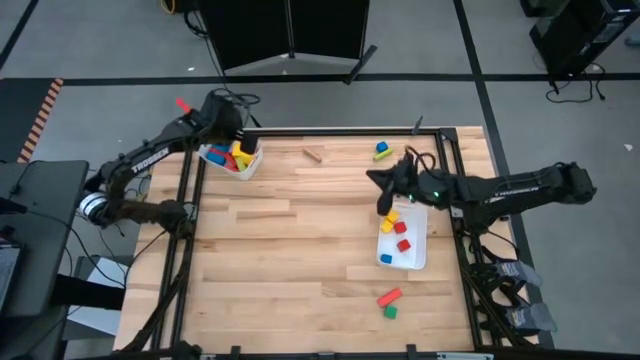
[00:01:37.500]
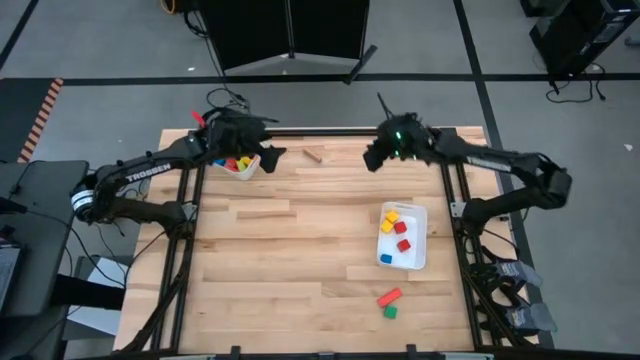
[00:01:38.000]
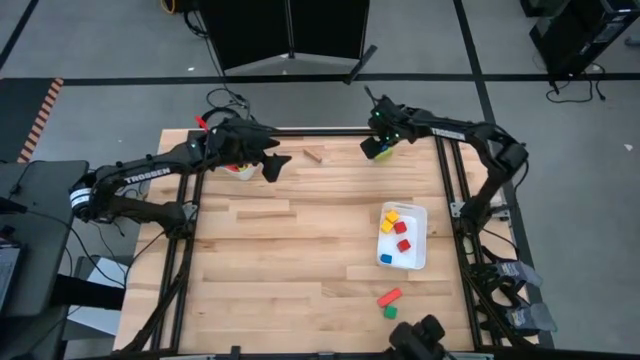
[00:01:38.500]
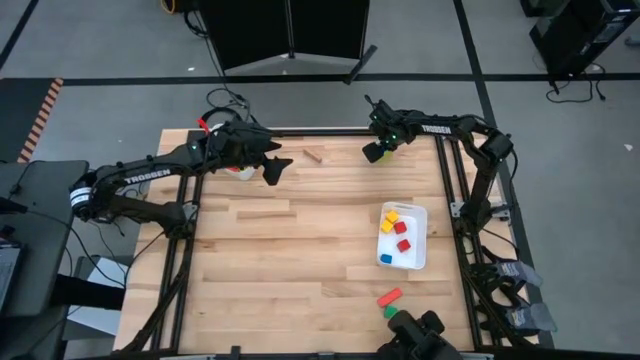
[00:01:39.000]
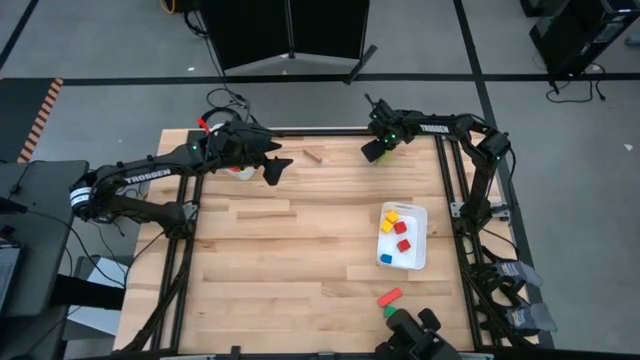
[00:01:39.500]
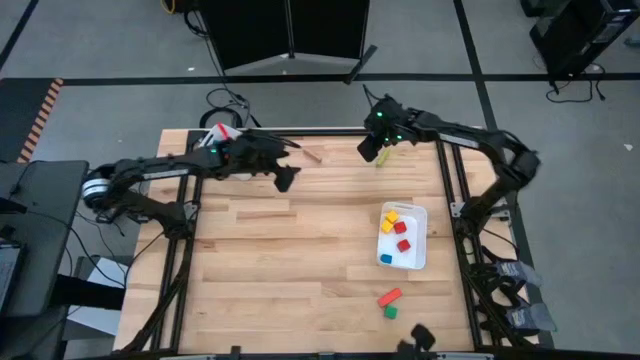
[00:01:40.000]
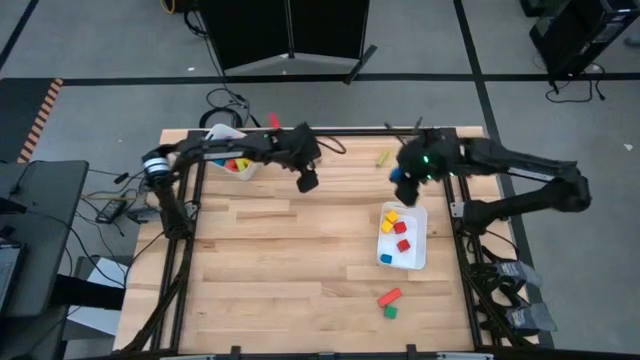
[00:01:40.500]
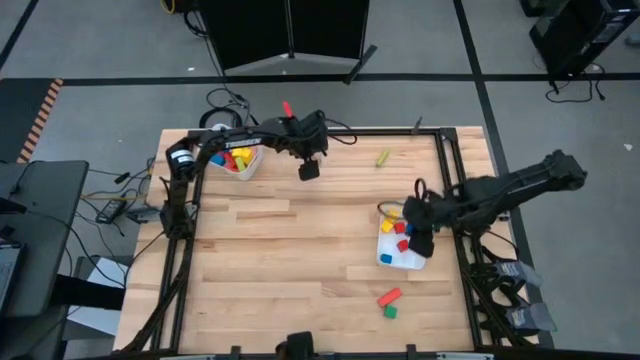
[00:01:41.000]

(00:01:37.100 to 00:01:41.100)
Task: Sort blocks by size
Put the blue cube block into the bottom white bin

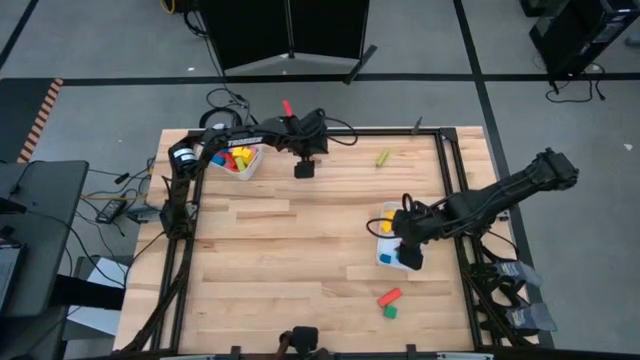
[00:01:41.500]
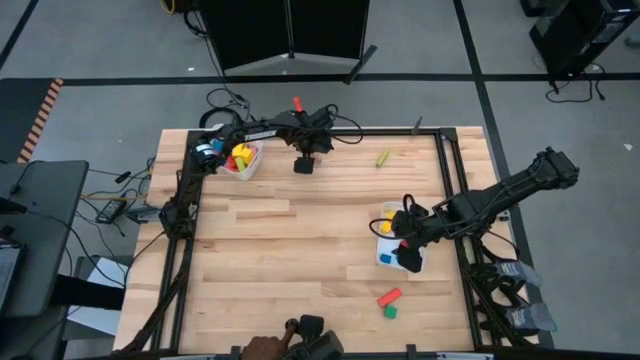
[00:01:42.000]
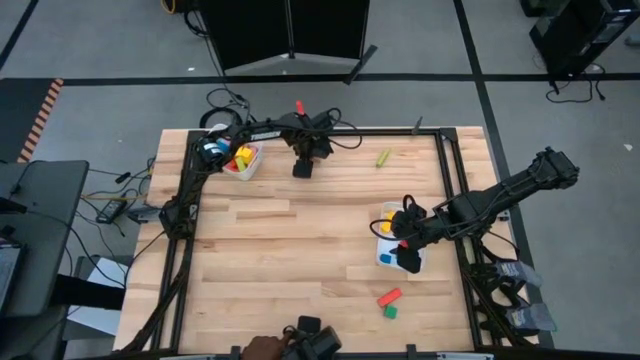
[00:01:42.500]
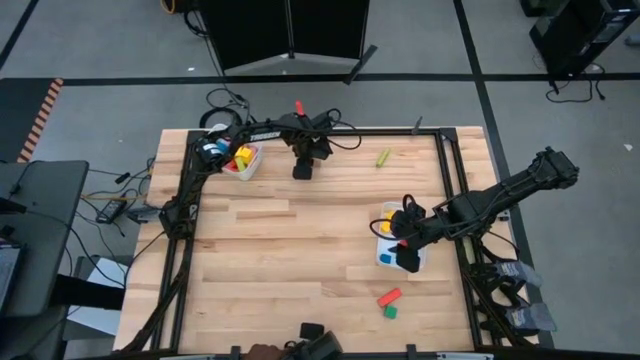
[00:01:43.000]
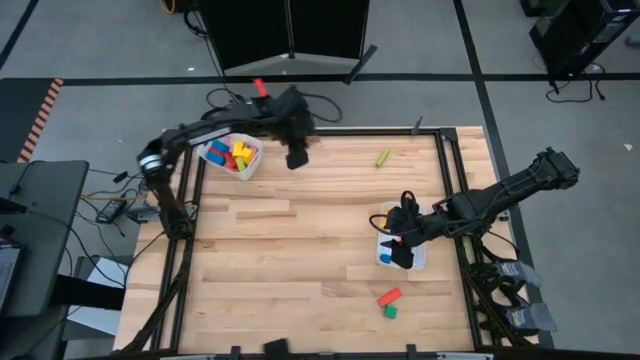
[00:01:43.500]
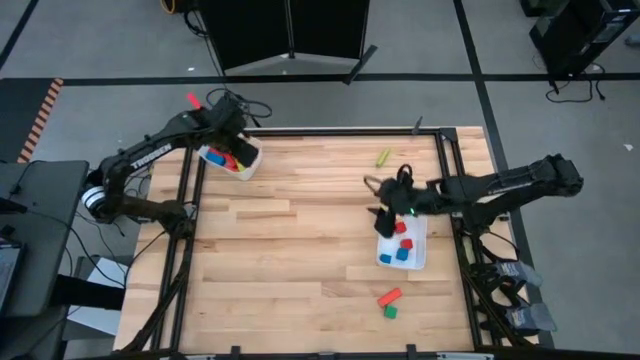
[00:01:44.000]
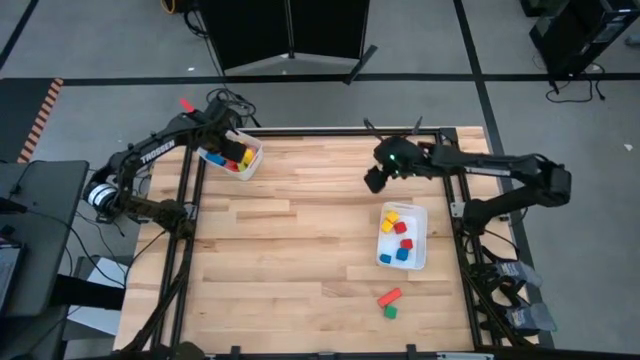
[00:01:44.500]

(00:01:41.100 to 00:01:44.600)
Put the brown rectangular block into the top white bin

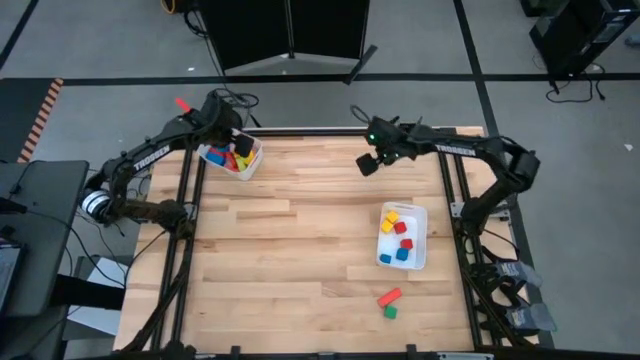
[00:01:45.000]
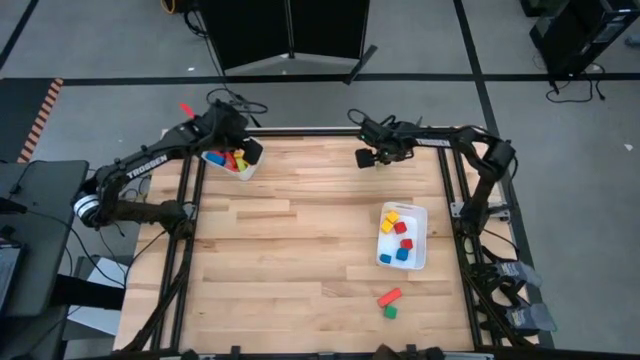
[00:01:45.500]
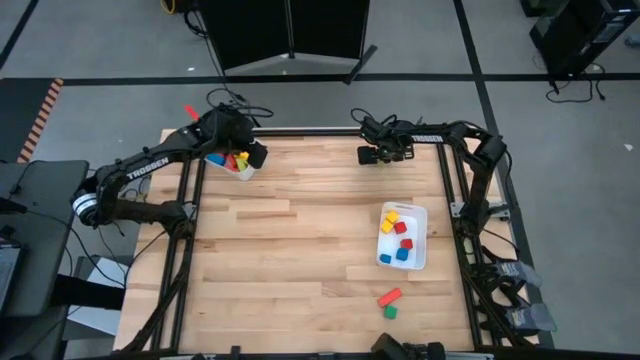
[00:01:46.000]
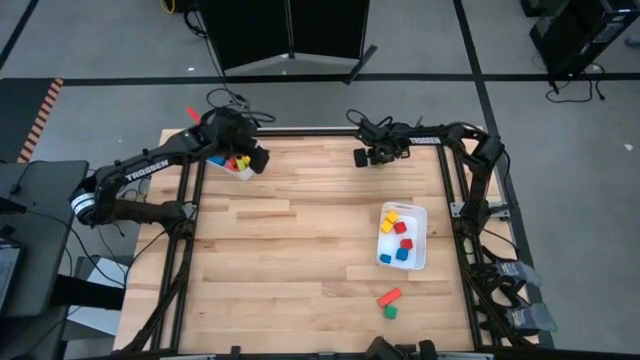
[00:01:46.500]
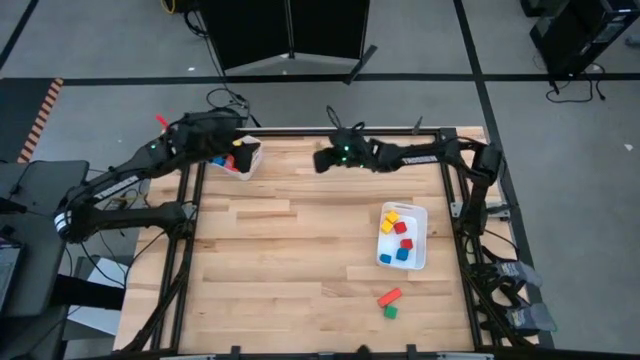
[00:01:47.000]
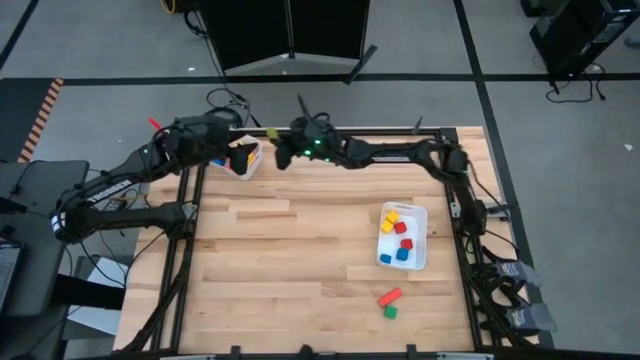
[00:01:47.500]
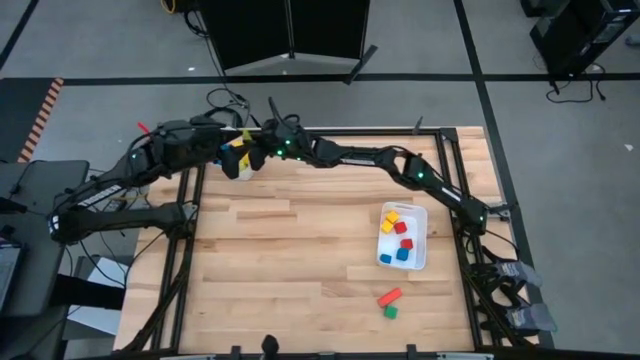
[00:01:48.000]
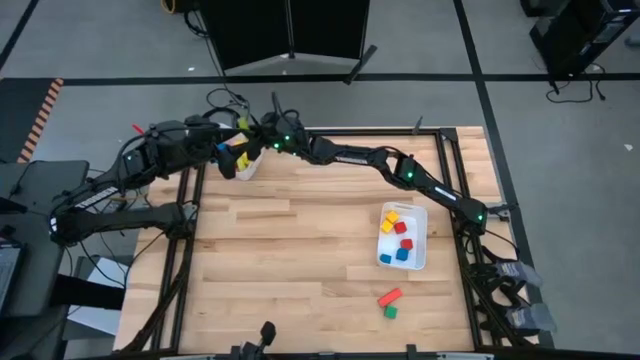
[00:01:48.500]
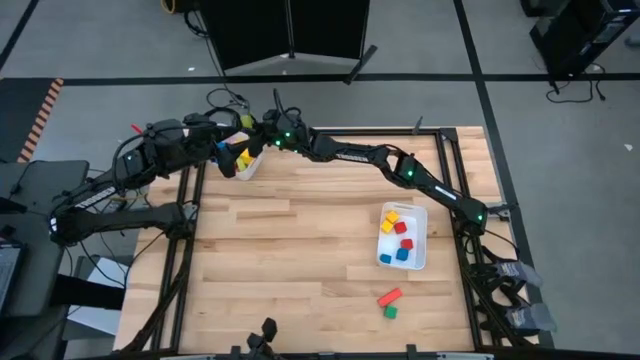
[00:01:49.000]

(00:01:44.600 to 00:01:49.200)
Put the light green rectangular block into the top white bin

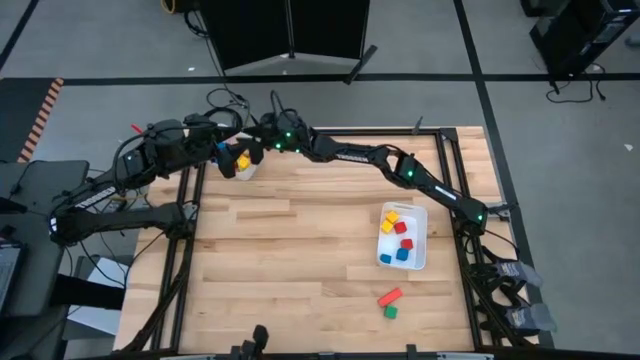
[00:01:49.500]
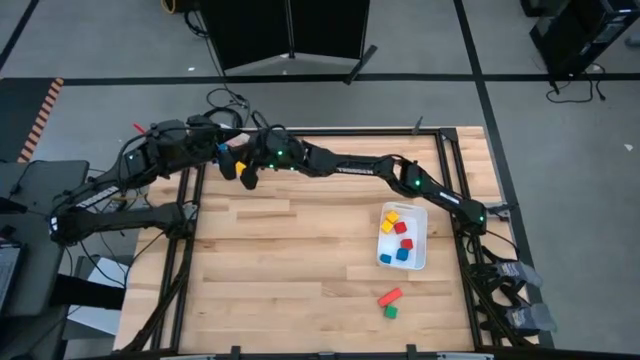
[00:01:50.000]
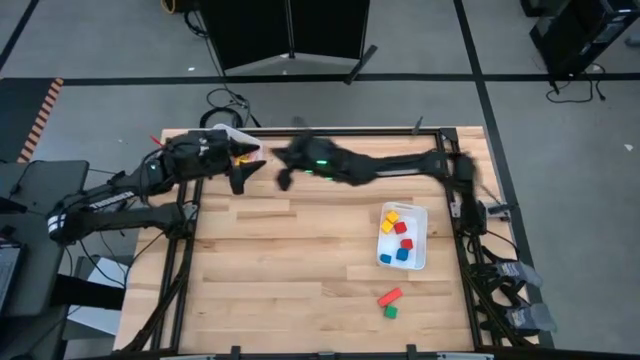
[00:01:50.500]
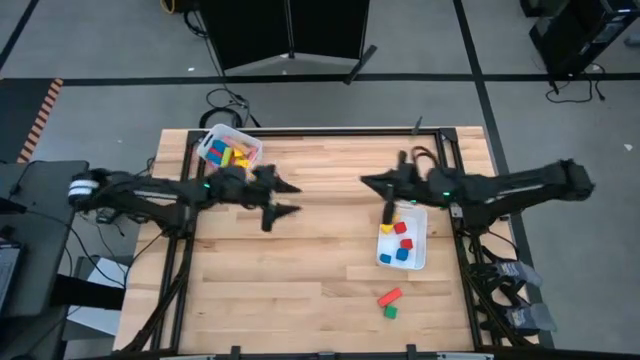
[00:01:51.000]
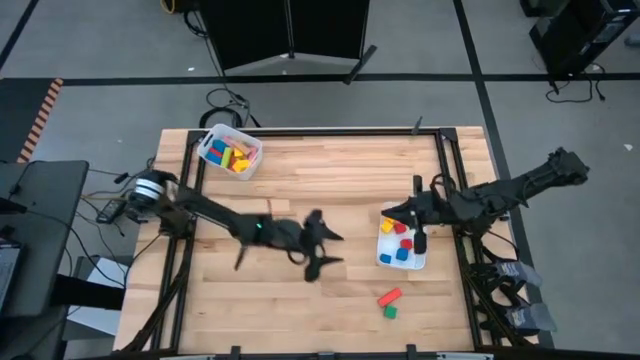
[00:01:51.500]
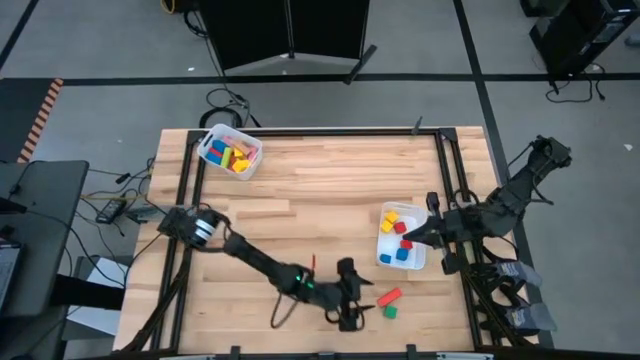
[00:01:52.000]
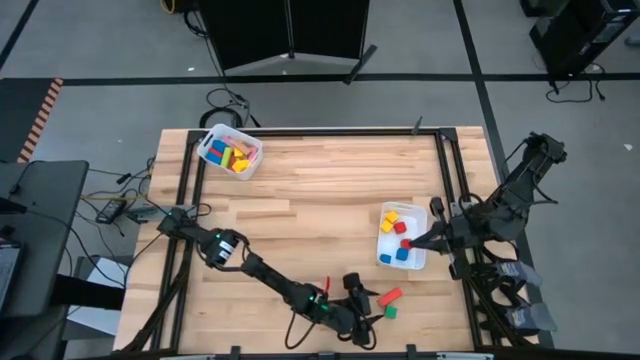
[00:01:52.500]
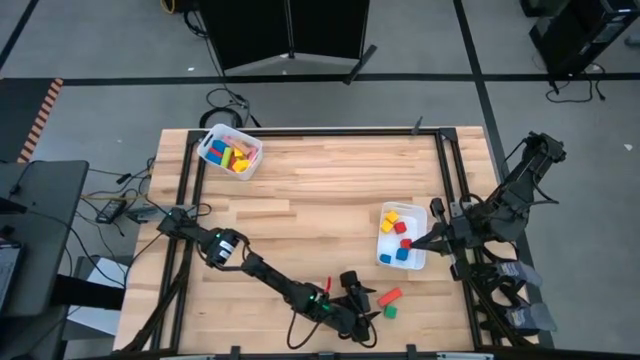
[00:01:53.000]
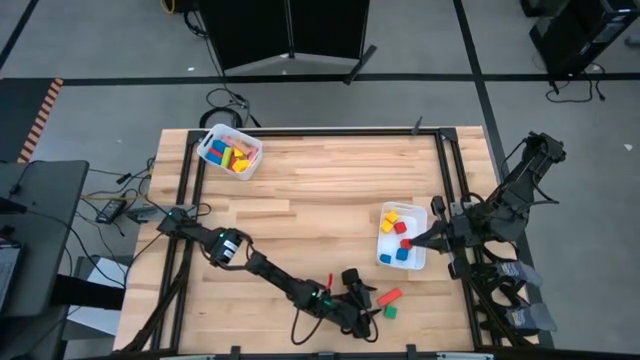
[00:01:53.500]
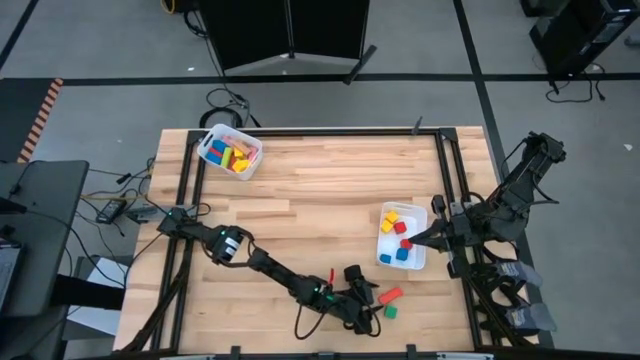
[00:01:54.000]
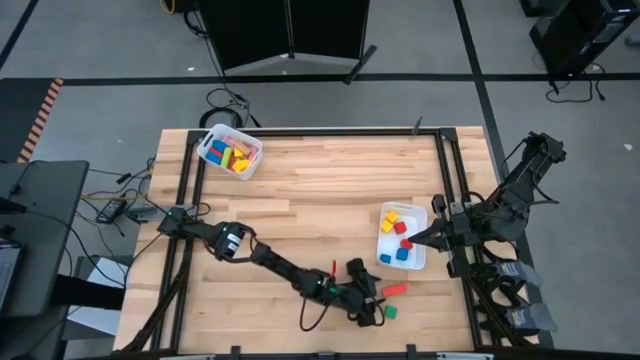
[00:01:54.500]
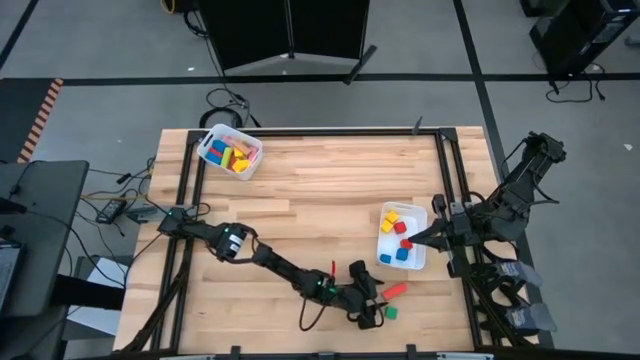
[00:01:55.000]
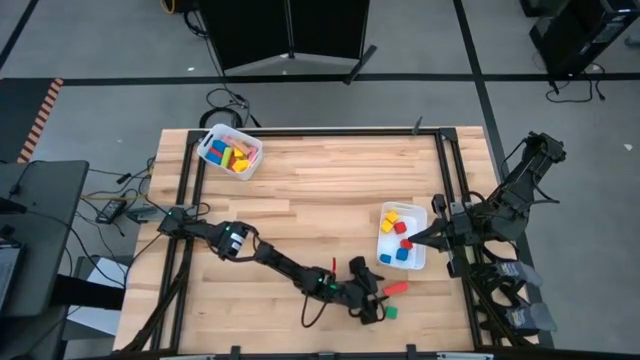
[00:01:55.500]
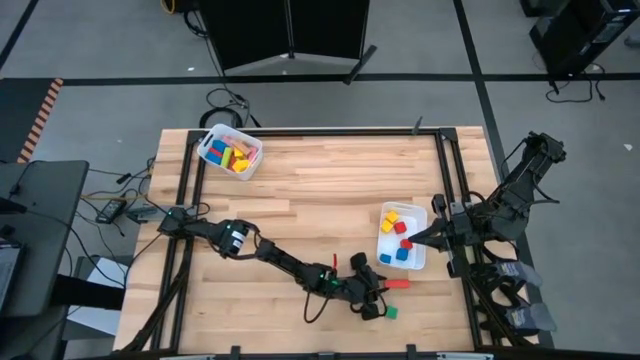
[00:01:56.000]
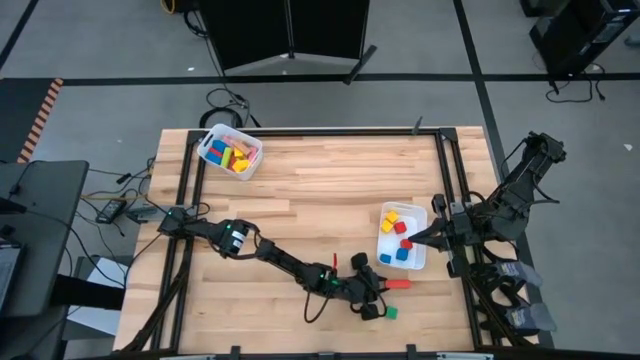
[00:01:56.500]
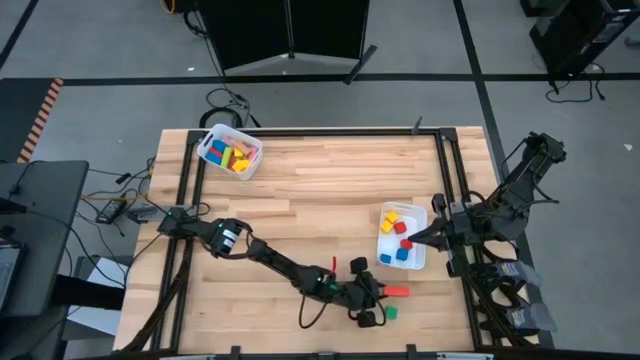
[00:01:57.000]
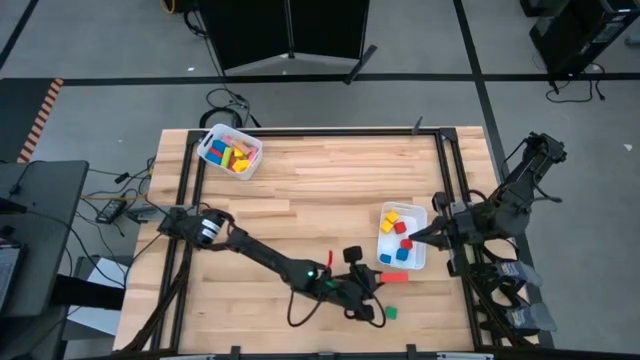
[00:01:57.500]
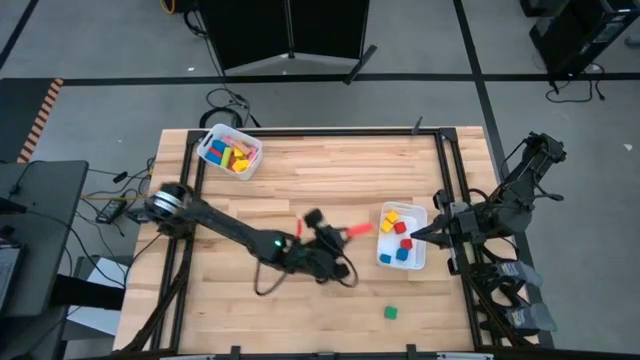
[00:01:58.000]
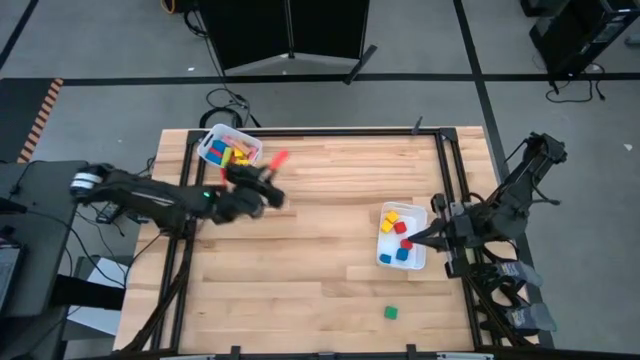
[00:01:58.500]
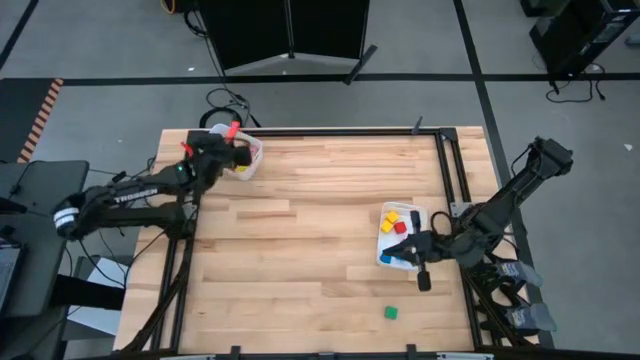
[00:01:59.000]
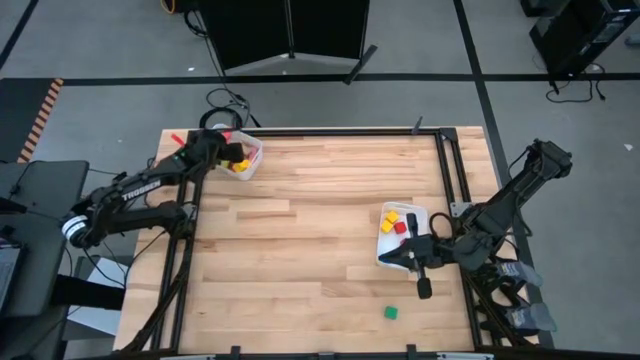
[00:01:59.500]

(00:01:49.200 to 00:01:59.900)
Put the orange rectangular block into the top white bin
